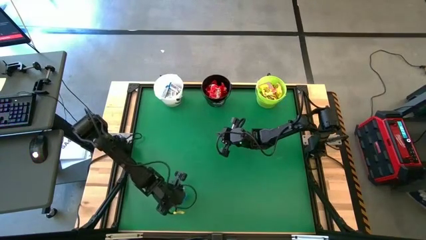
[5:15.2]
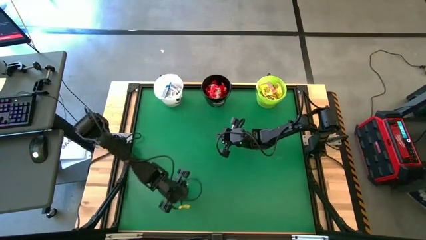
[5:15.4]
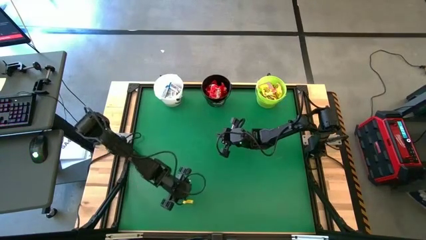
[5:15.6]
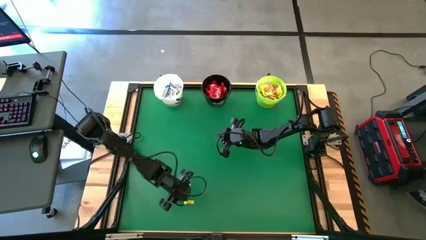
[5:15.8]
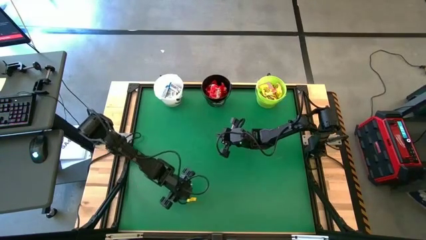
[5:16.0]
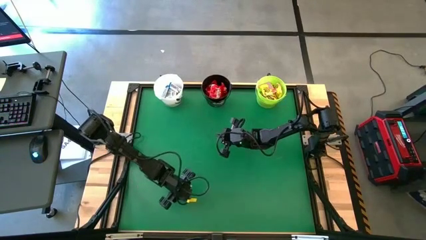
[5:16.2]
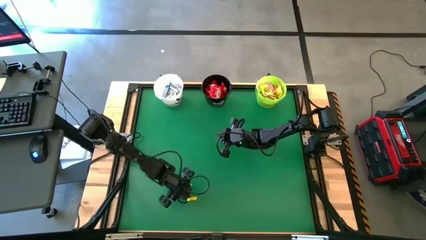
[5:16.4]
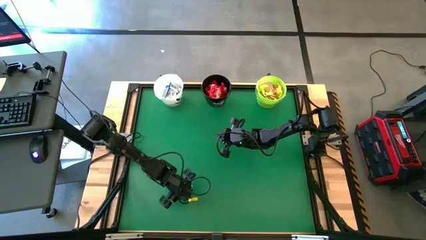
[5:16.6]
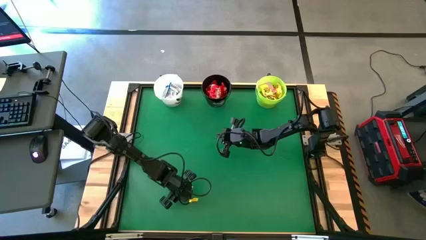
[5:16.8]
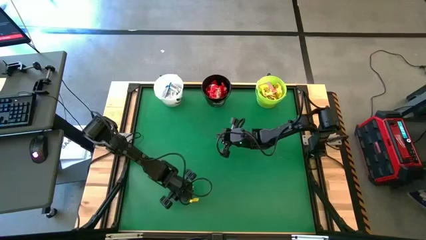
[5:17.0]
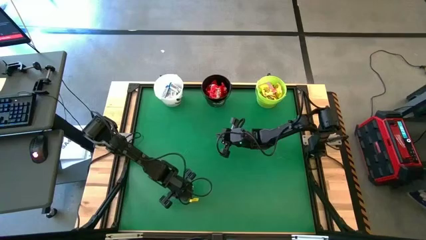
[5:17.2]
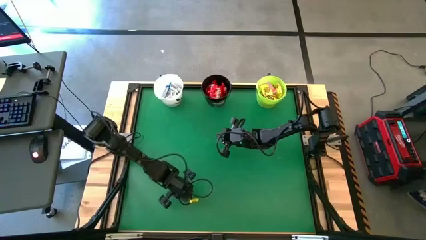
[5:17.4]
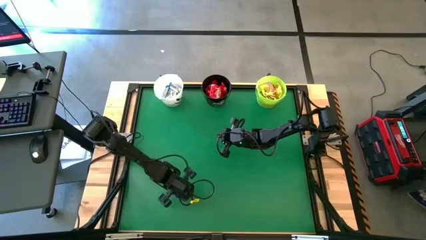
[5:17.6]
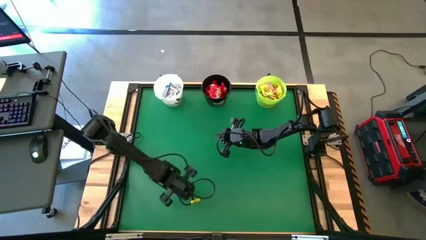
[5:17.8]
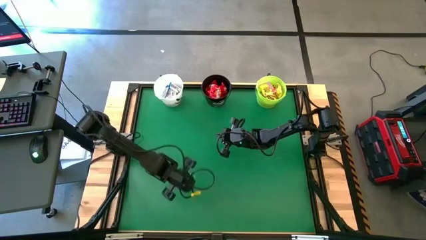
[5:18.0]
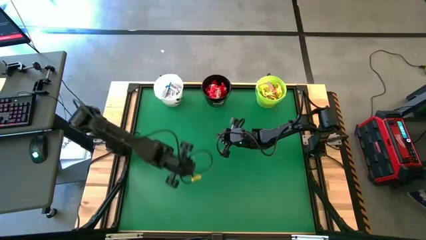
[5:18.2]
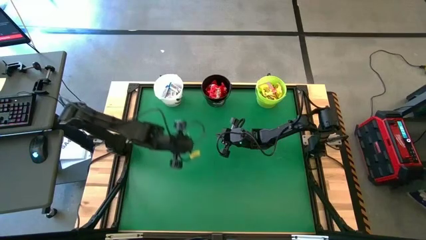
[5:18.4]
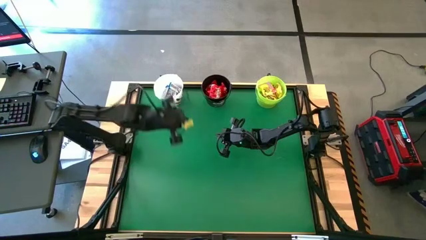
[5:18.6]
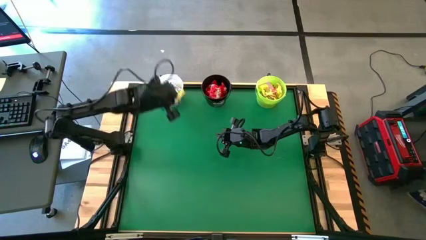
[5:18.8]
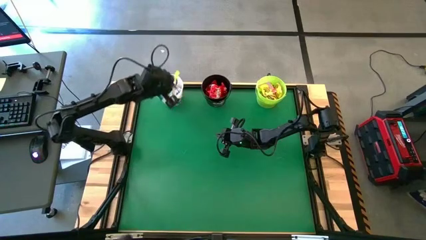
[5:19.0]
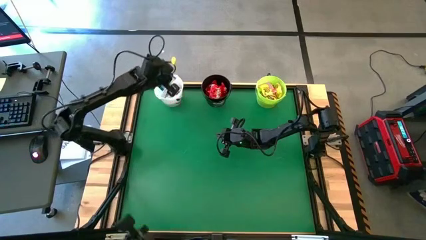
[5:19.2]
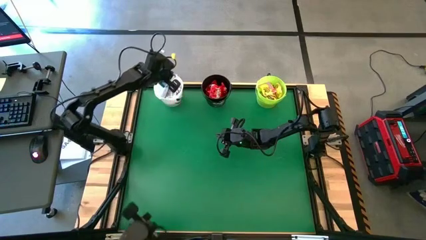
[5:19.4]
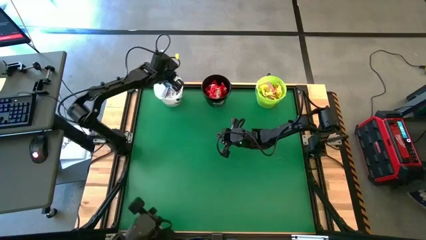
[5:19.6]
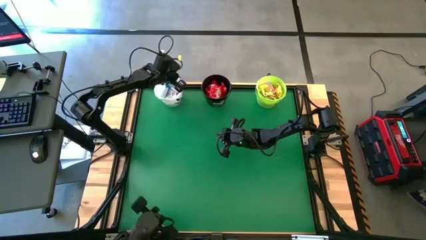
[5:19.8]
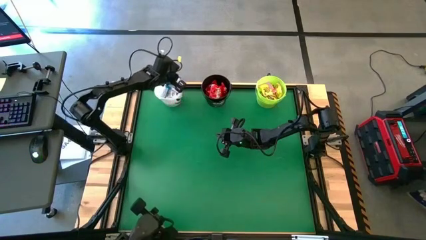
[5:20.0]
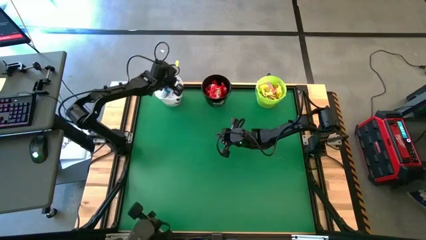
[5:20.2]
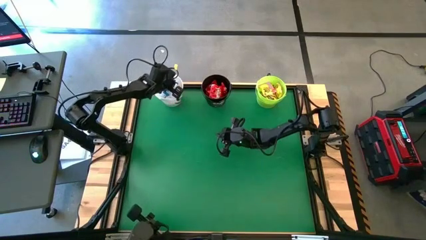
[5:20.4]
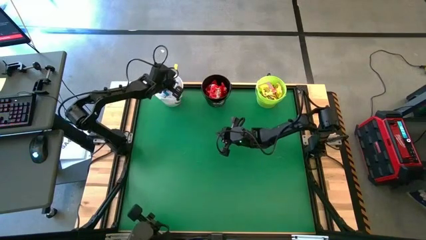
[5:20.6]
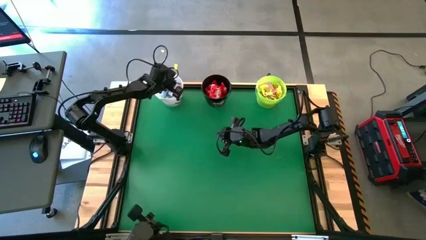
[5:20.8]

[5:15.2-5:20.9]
Task: Sort candy by brand, put in halloween buckets
Put the white chocolate bar into the white bucket

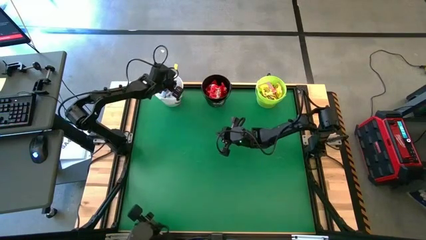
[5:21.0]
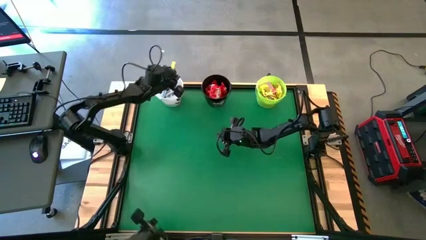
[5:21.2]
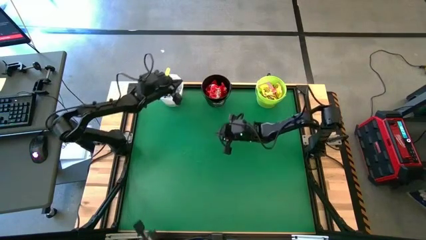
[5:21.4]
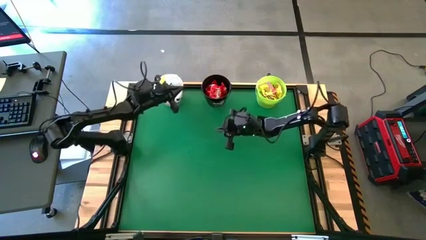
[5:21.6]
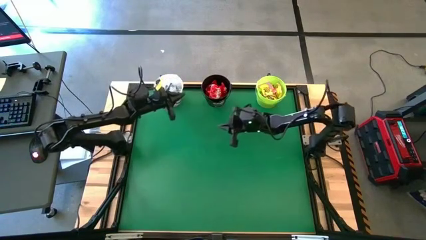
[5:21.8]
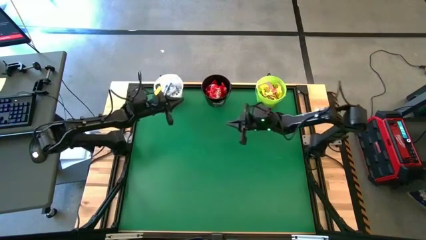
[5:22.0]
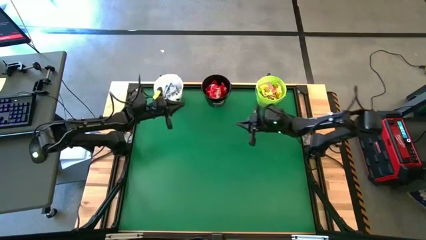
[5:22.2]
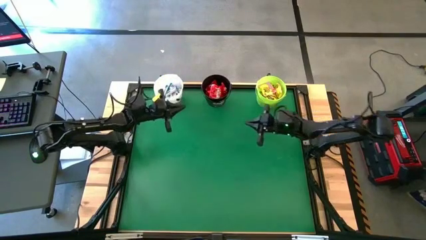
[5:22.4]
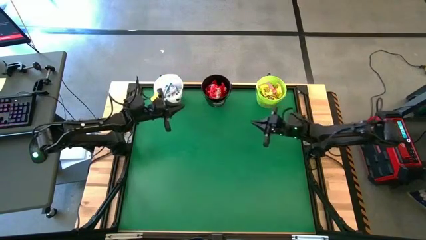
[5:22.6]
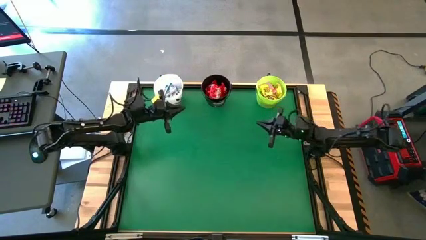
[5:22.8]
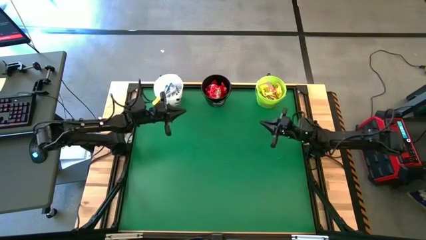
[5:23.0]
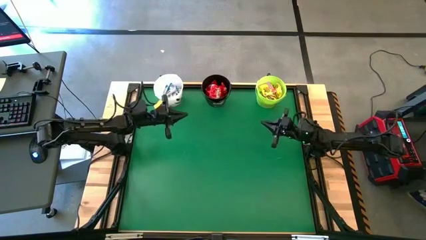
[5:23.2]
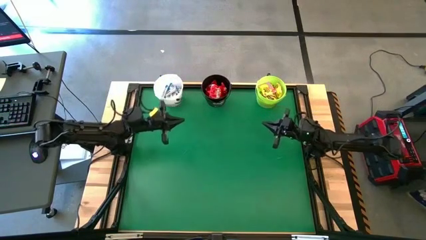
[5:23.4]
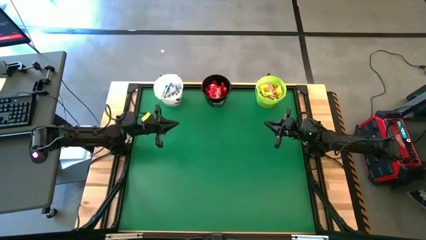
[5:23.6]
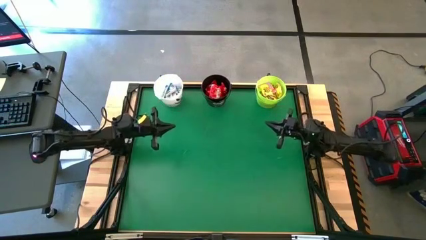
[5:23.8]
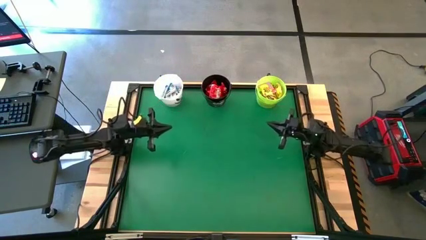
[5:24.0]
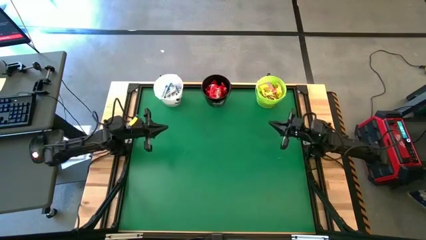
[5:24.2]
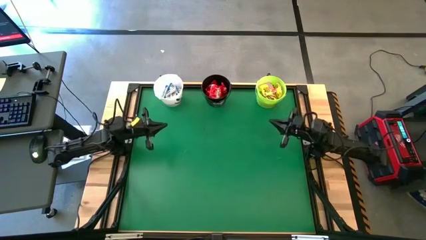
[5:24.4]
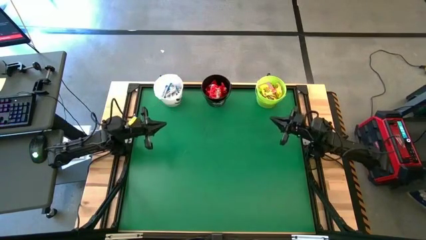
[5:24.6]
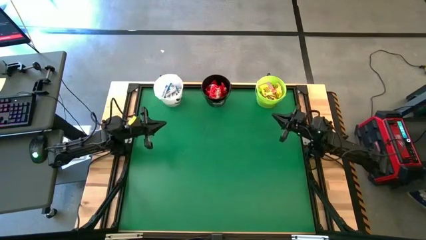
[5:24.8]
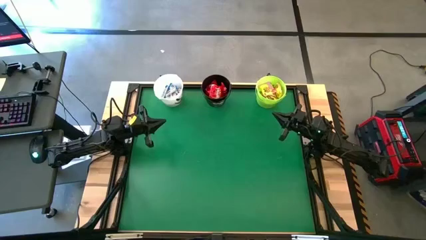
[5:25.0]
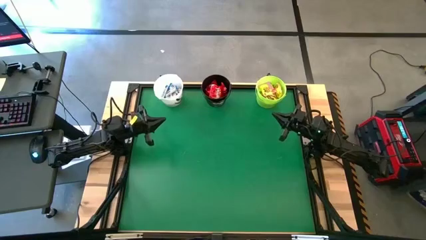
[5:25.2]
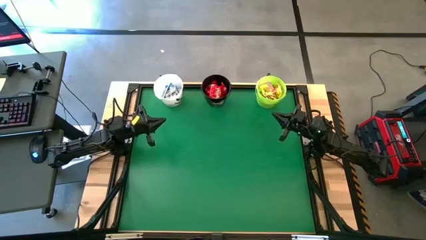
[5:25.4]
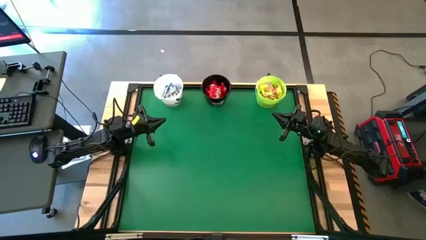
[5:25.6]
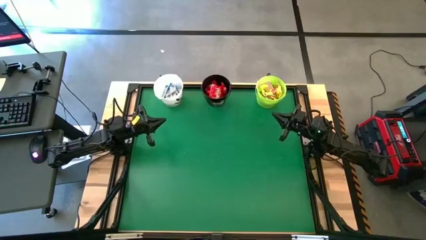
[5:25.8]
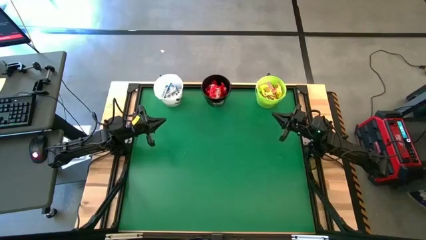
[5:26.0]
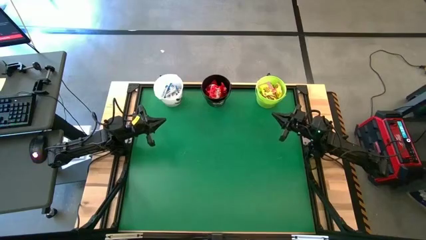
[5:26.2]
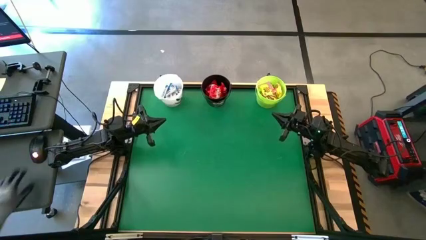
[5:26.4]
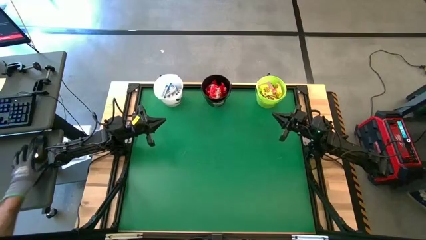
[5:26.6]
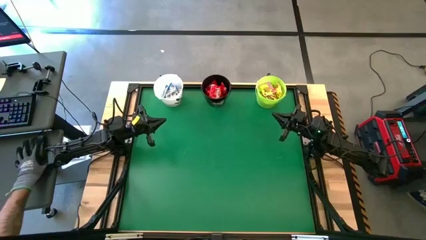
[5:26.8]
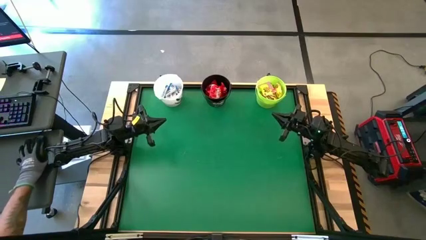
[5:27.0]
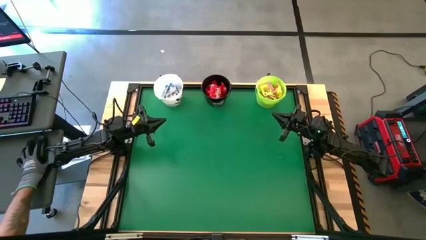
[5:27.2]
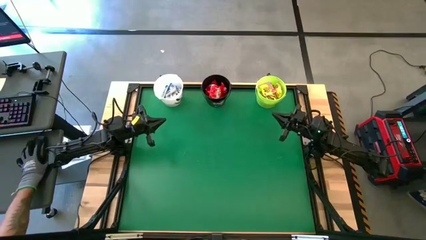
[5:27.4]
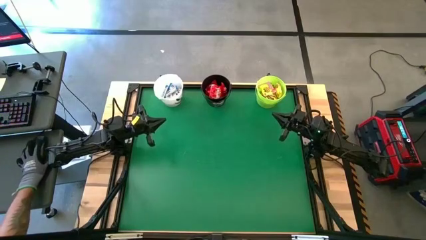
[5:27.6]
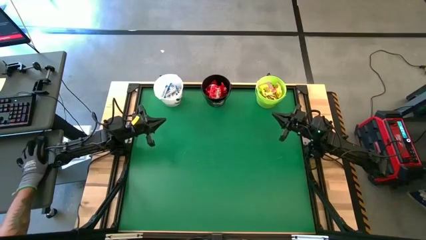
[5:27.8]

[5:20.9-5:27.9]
Return to Home Position

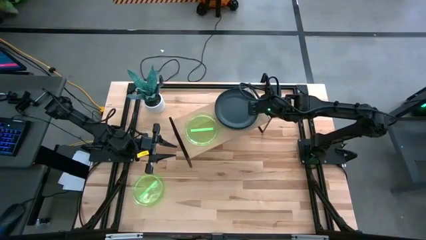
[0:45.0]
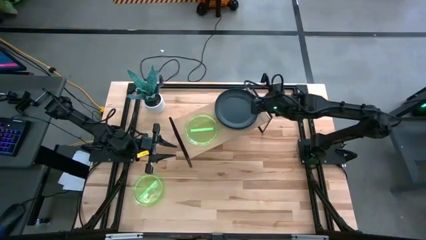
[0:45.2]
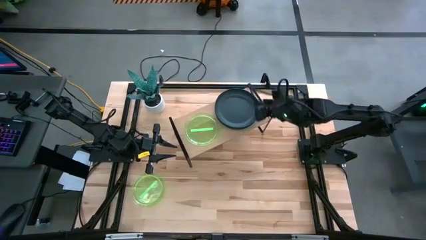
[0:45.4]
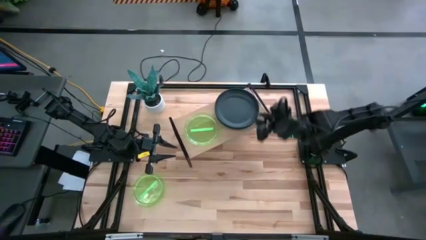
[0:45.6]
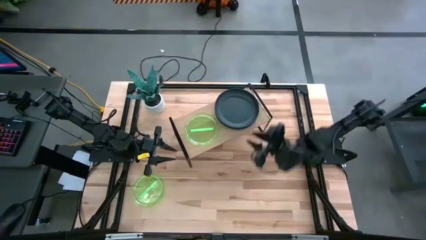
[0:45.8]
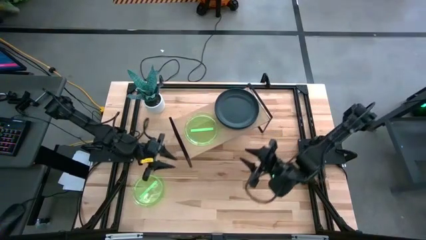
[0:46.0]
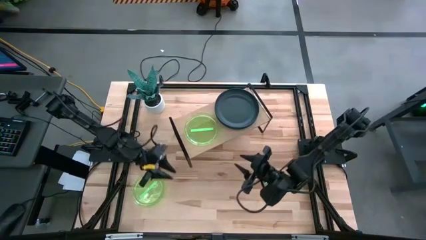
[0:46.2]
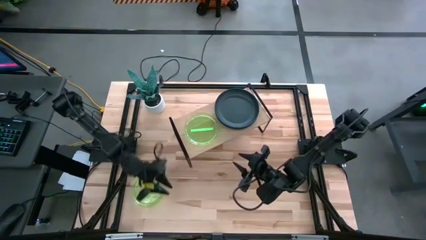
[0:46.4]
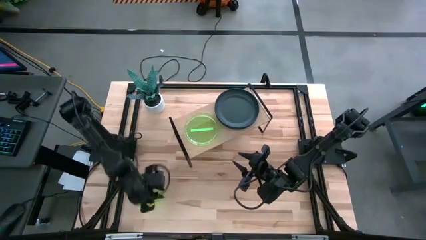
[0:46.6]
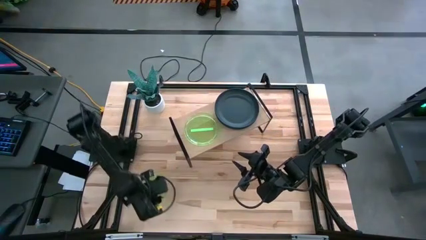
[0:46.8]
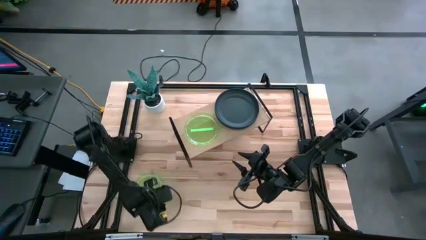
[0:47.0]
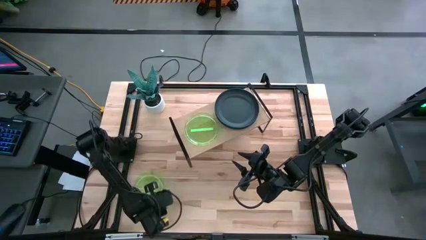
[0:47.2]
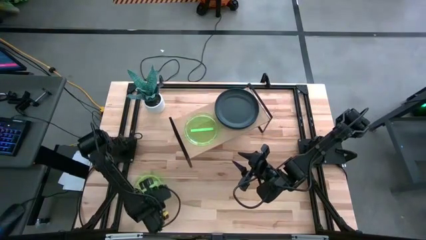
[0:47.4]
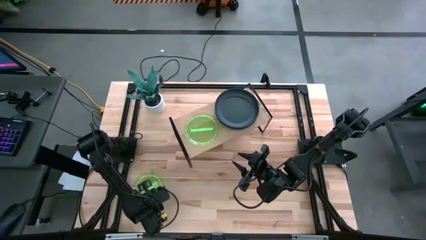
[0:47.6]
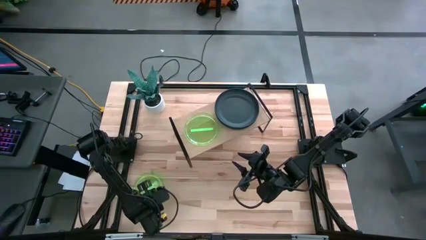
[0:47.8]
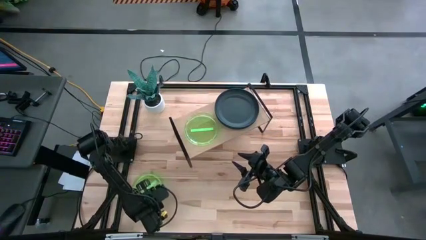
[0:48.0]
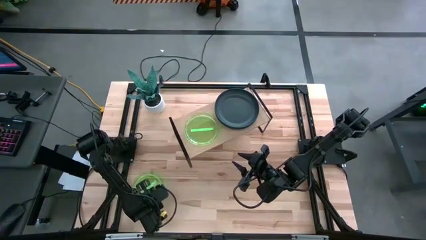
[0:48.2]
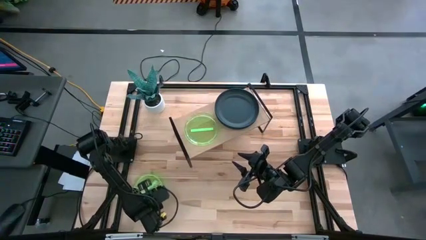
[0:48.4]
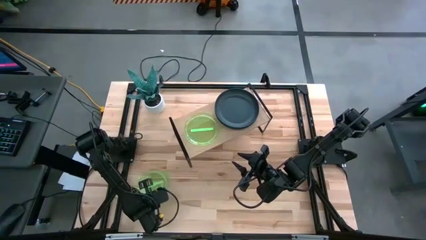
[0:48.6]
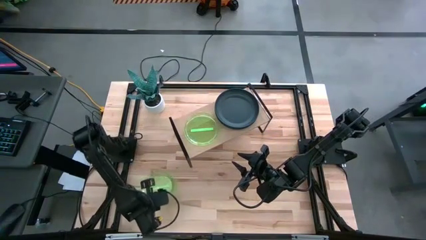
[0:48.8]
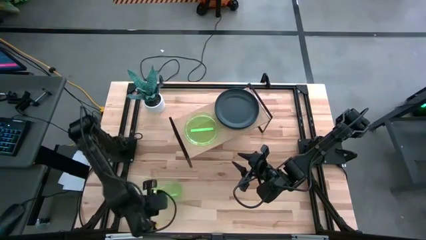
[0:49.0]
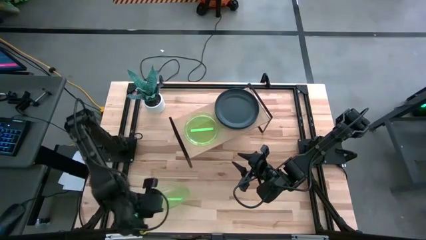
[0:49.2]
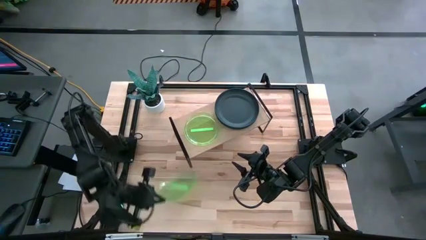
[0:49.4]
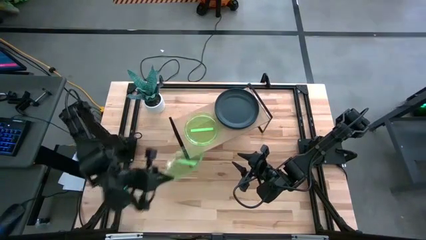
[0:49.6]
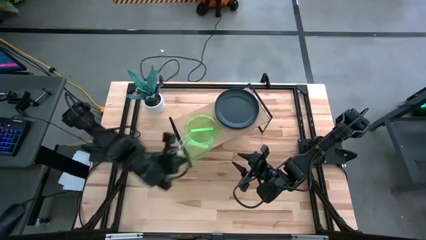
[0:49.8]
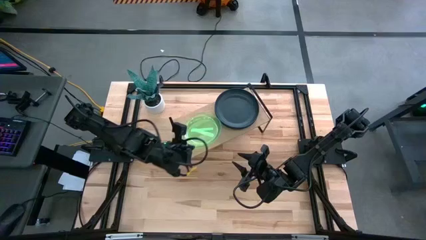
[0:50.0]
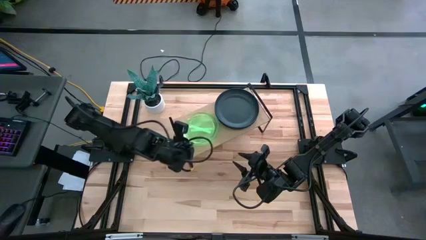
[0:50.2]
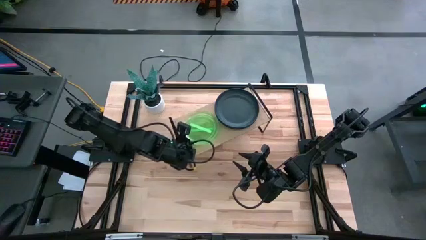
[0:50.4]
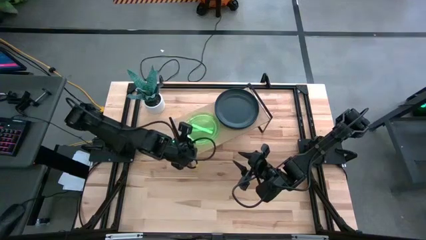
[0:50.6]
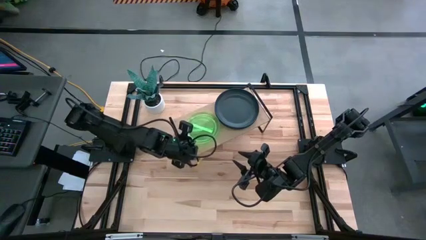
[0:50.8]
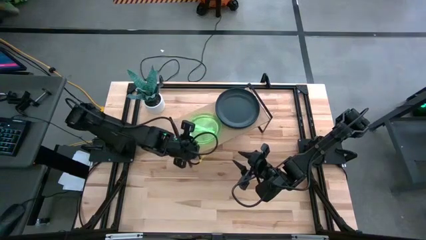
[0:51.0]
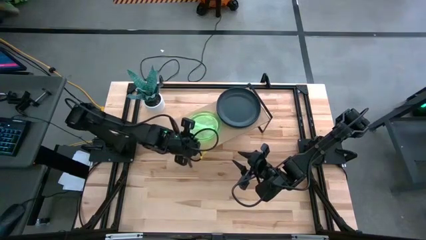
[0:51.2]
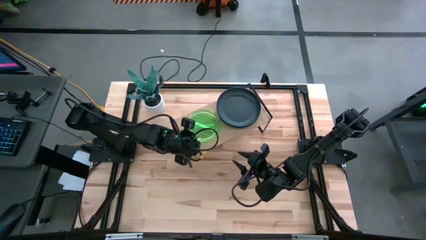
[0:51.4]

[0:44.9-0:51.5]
Task: Place and stack plates onto a shelf
Stack the bottom green plate on top of the green plate on the shelf
